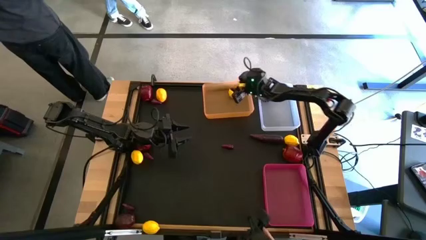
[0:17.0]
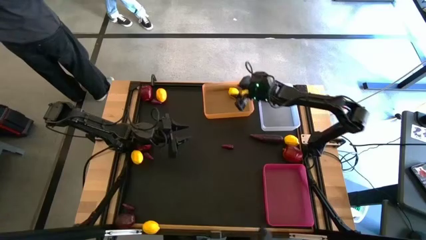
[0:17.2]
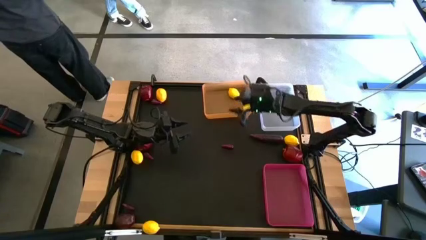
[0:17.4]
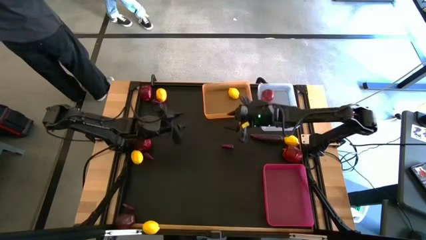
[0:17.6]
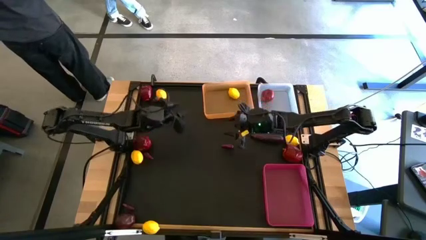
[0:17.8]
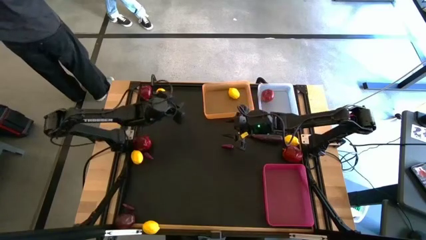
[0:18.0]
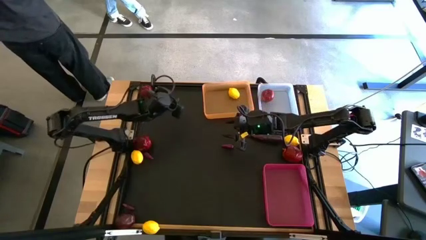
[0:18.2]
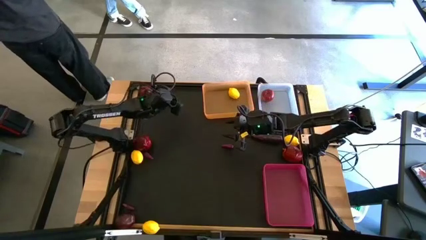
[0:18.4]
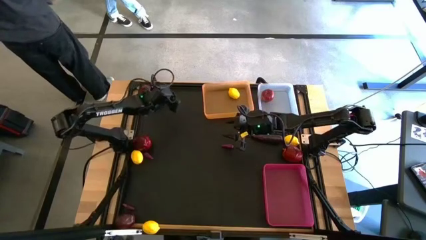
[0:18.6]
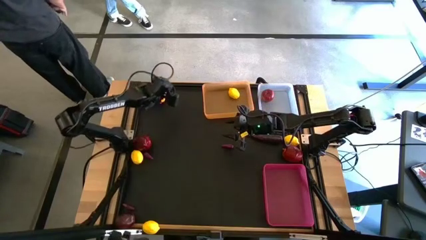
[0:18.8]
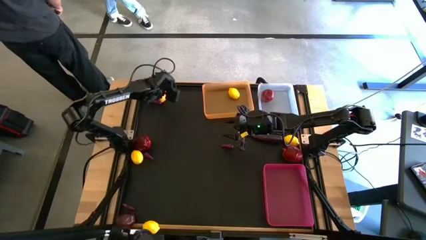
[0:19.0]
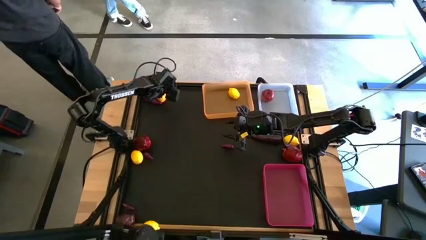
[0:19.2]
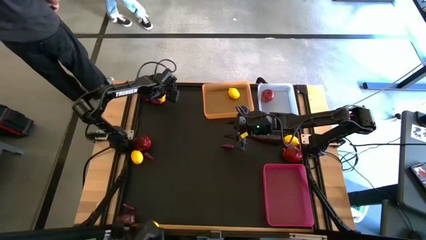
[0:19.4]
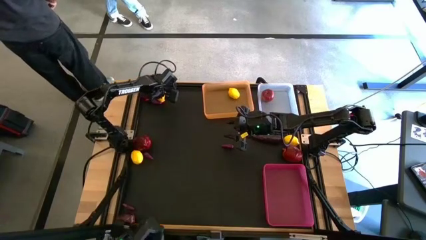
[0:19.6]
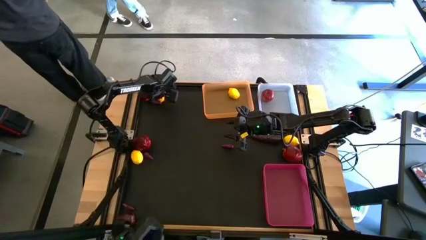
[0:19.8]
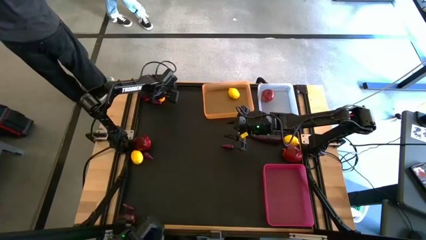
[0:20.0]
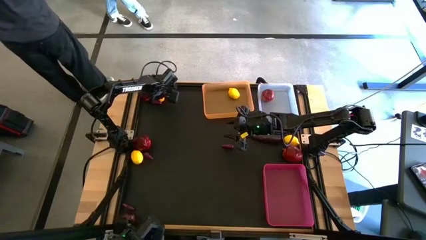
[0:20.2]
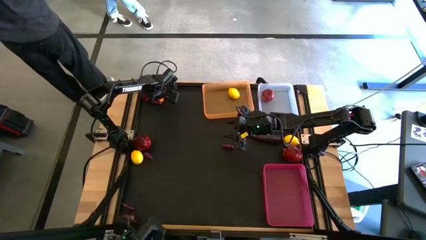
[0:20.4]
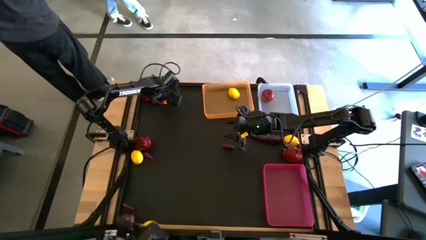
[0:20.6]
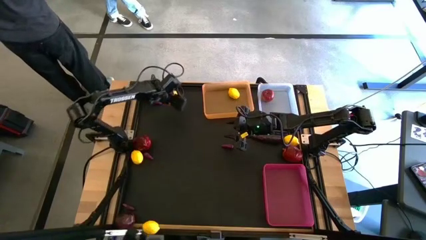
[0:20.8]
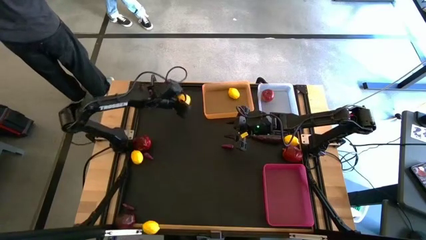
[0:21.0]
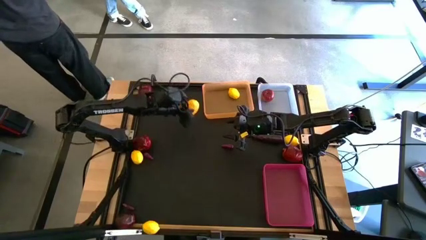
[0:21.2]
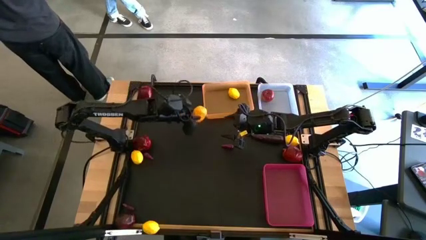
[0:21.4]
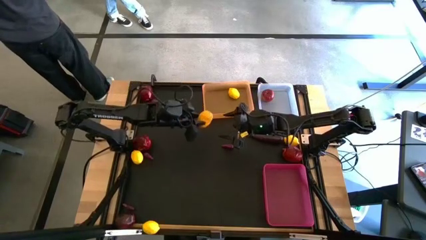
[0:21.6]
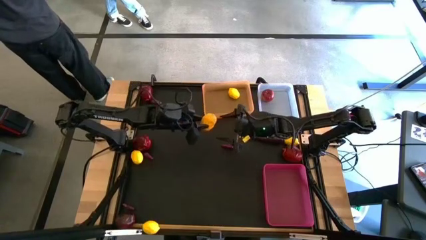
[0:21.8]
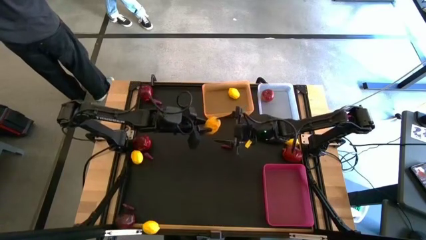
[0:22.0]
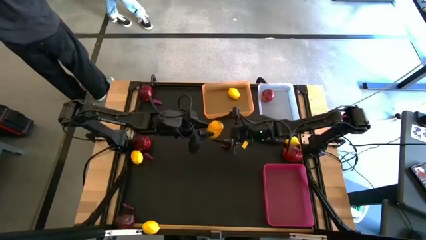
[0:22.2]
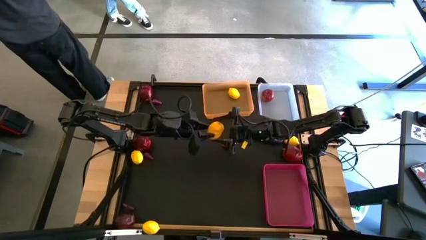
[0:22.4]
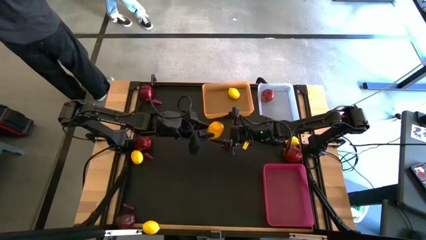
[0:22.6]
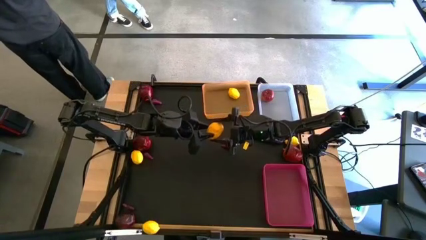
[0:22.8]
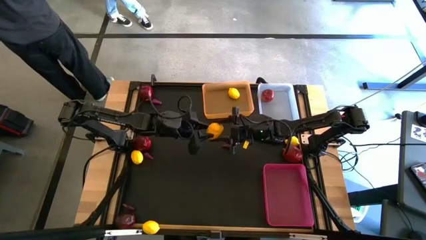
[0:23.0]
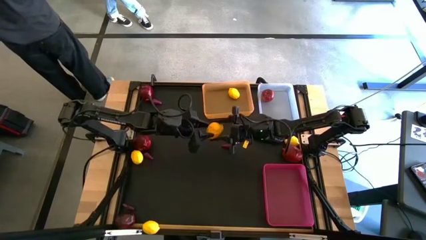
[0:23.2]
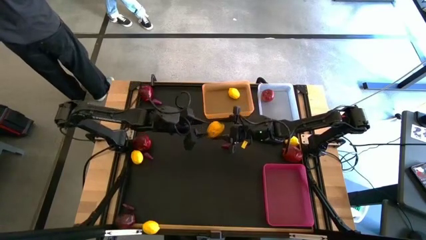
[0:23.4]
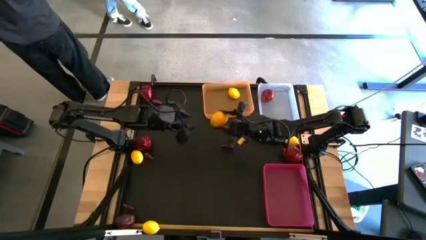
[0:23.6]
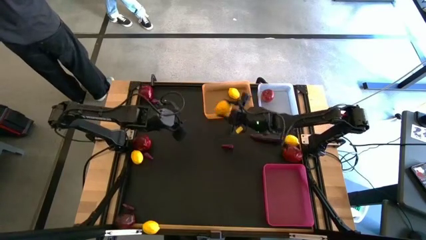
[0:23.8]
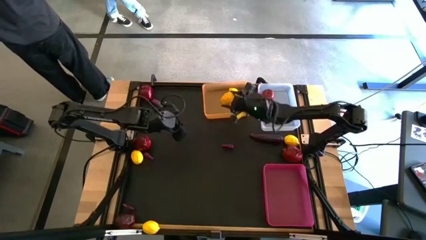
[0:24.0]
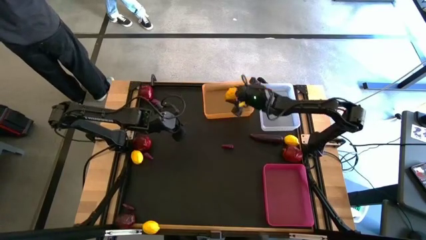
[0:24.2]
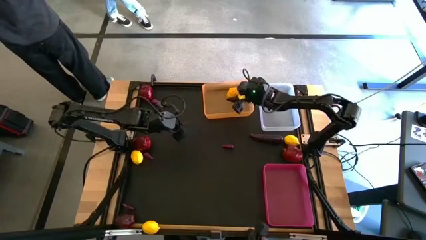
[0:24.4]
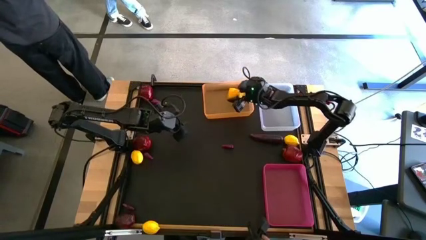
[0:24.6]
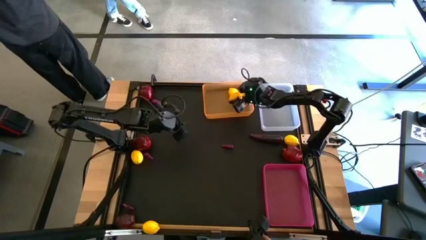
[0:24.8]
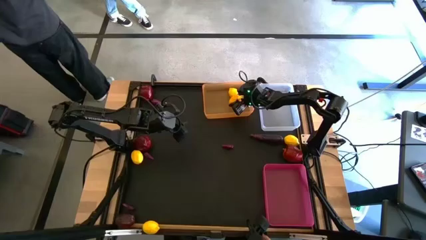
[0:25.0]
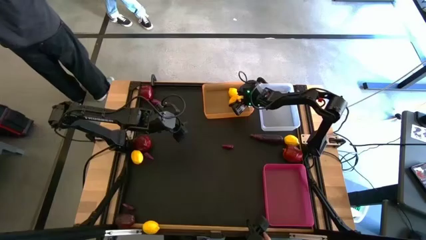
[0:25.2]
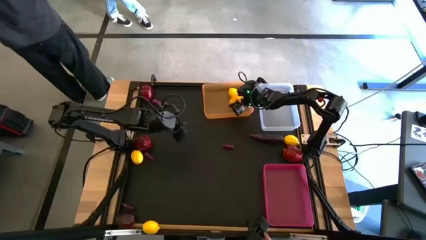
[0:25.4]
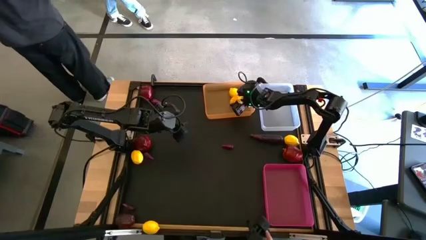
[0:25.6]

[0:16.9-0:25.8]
Task: Sort produce into baskets
Put the yellow lemon into the orange bin

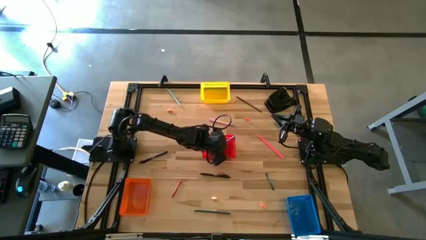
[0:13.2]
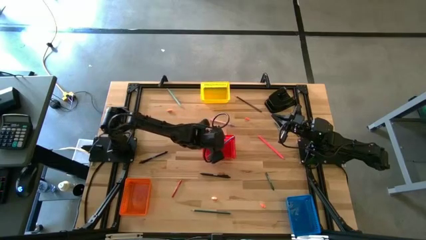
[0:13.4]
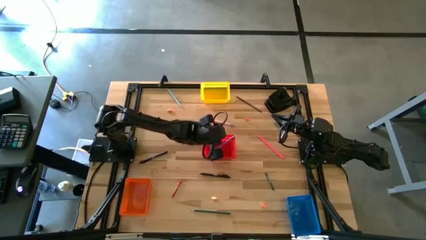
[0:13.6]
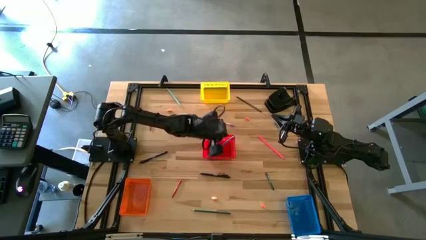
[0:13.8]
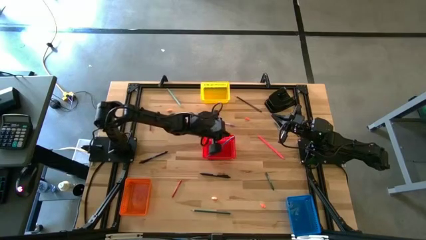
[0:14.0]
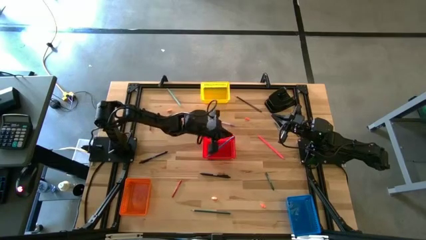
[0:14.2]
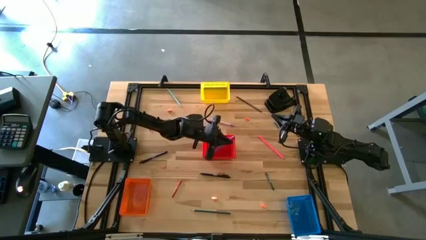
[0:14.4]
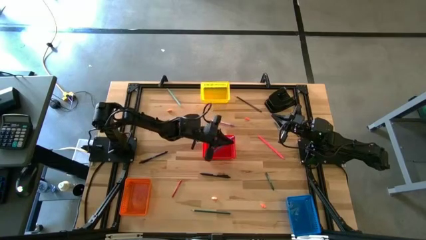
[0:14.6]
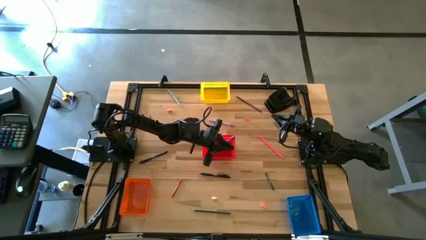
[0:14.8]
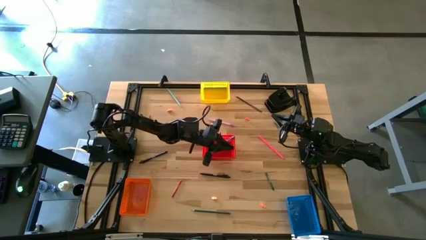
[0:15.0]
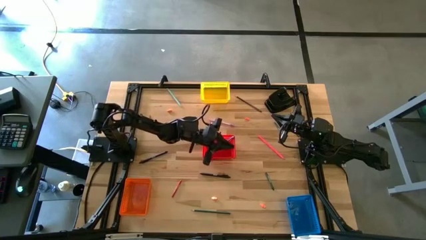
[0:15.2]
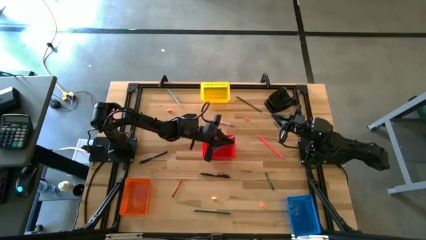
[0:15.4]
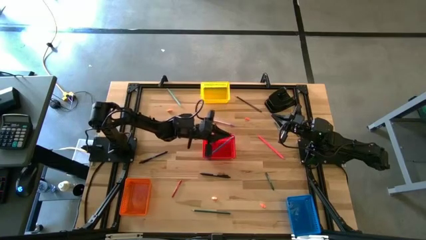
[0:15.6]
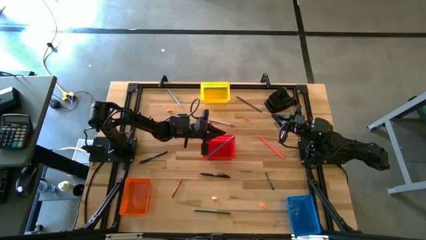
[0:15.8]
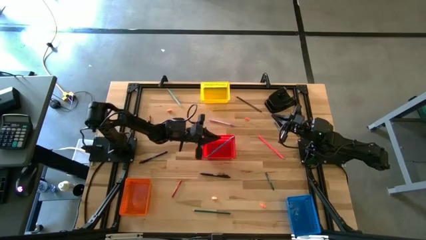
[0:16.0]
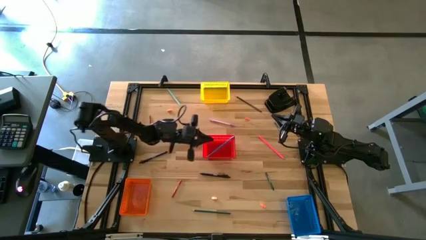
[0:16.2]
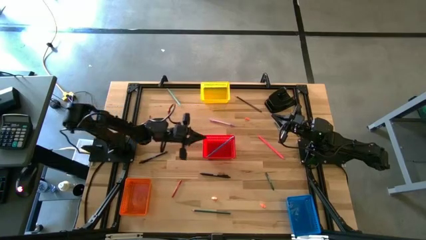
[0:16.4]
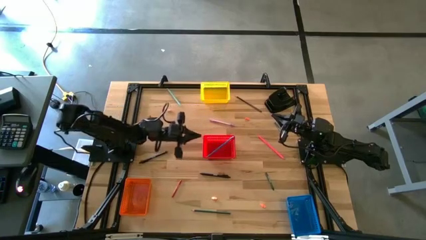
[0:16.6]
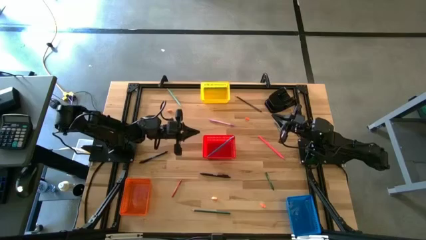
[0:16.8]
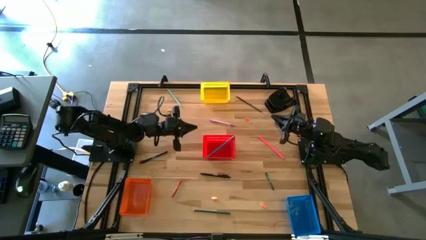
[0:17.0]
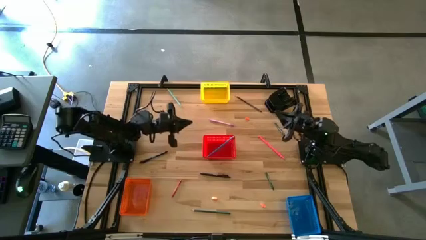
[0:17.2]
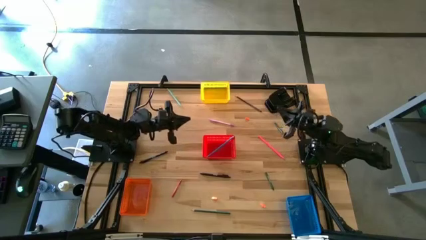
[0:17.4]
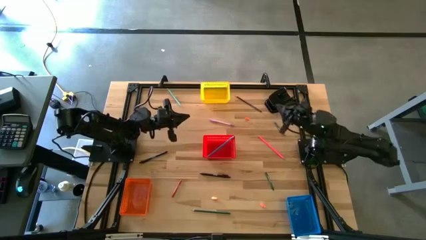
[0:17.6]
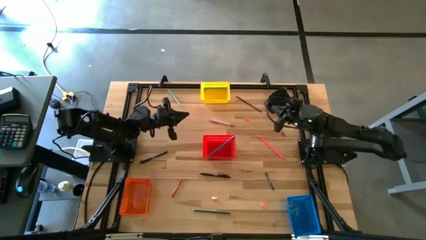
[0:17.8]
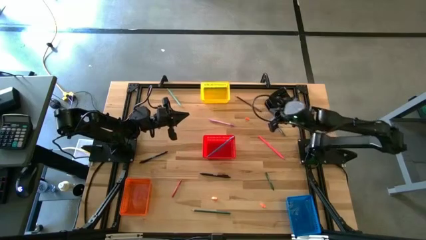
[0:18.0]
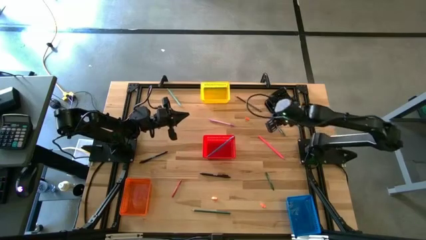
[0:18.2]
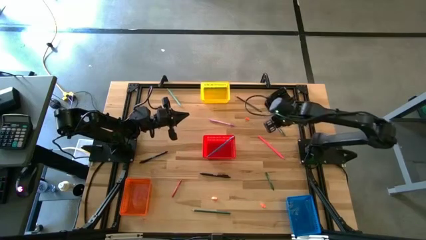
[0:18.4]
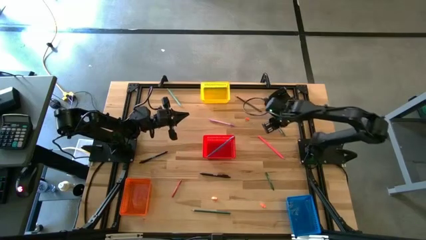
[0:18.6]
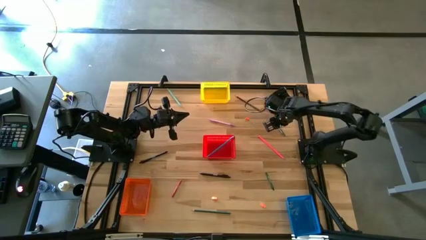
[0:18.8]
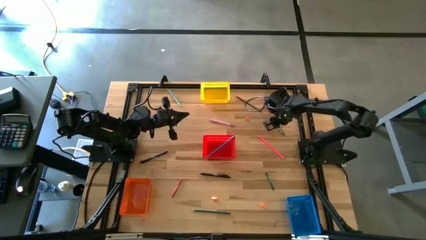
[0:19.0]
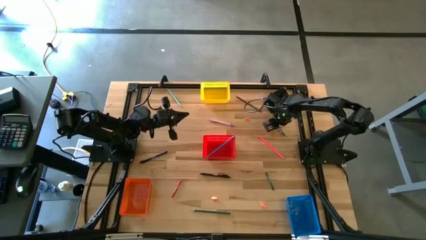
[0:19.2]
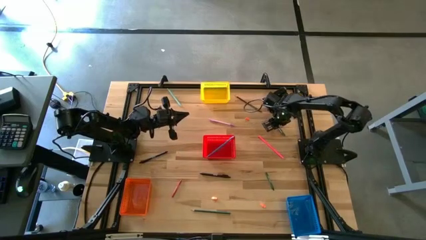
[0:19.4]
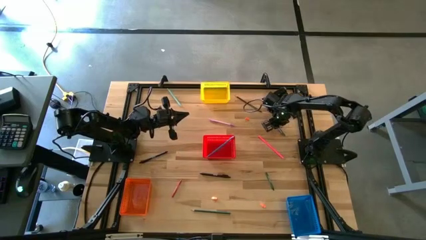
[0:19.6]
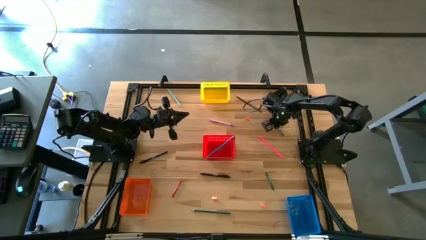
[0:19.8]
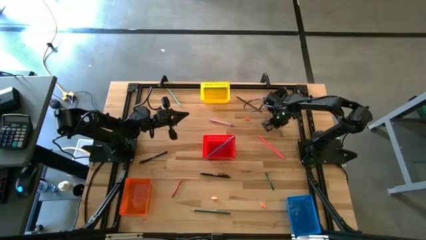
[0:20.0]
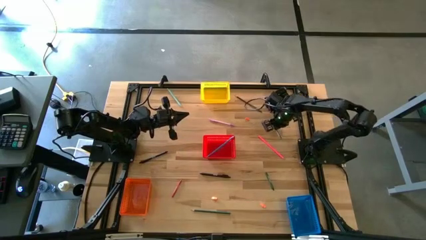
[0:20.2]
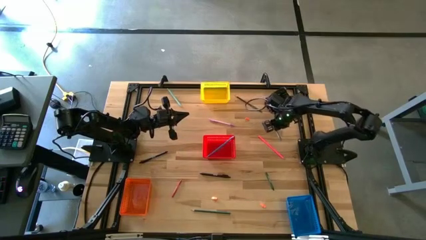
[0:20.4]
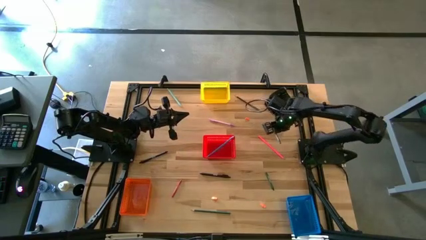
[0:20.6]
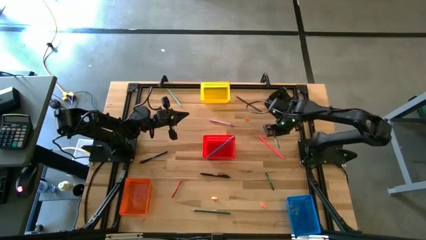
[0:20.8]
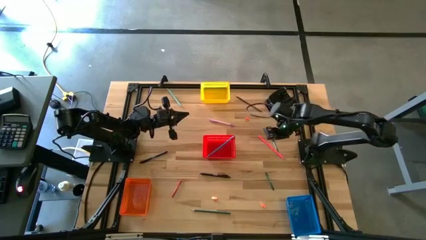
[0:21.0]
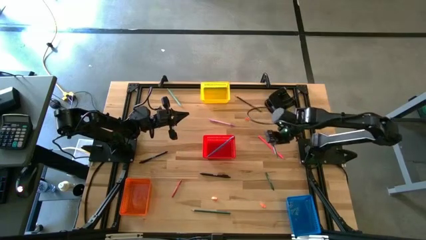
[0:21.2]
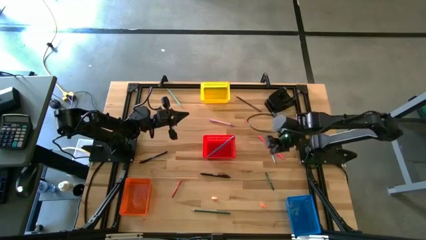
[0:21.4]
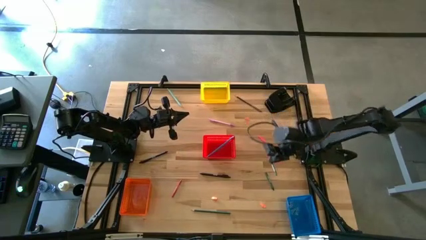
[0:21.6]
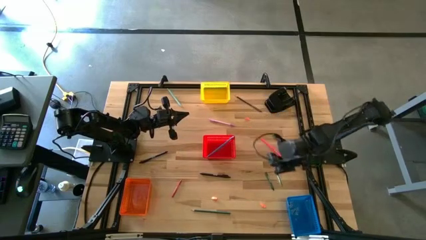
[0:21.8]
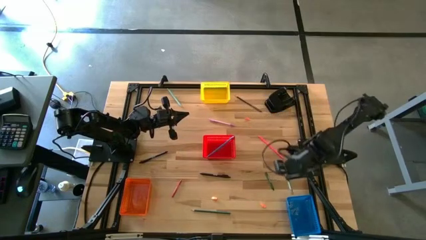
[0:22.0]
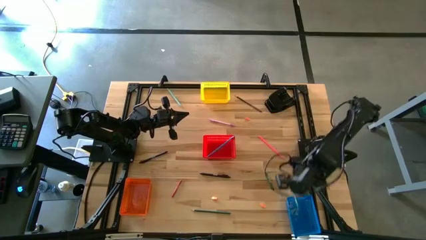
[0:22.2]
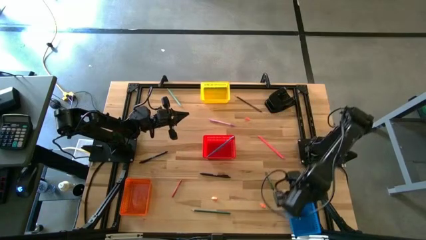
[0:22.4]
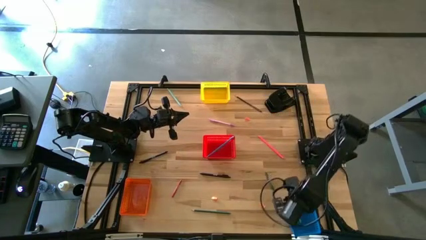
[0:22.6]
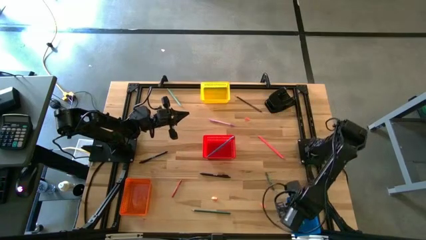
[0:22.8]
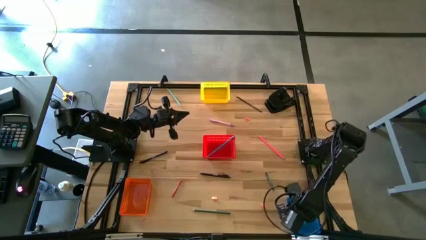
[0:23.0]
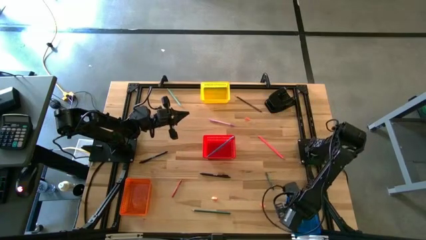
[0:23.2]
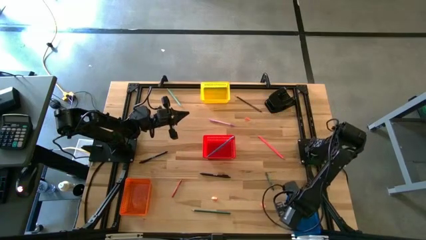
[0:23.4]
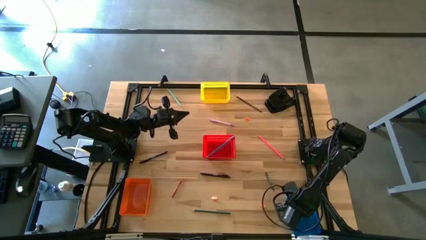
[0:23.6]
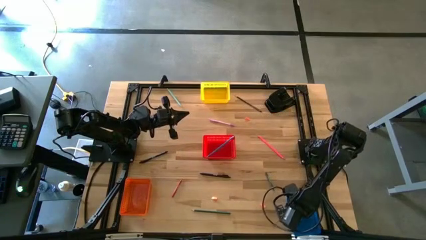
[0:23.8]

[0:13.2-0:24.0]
Task: Sort crayons/erasers/pens/pencils in bins
Put the green crayon into the blue bin
